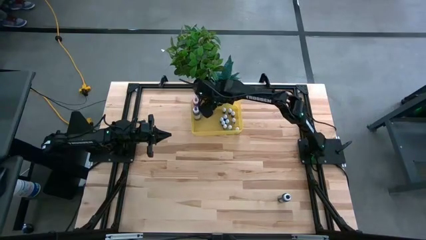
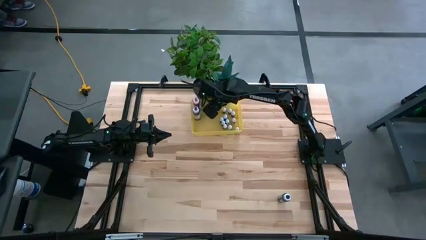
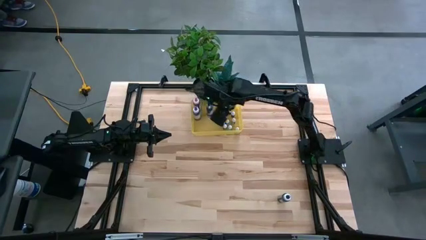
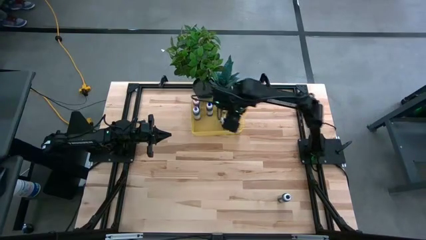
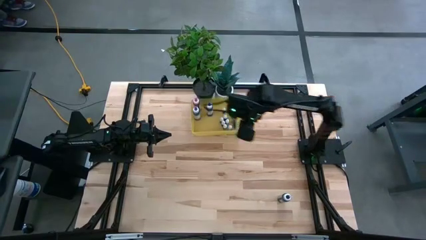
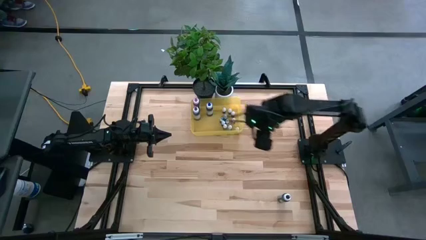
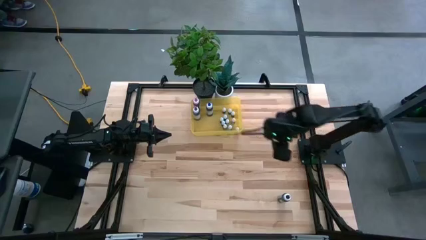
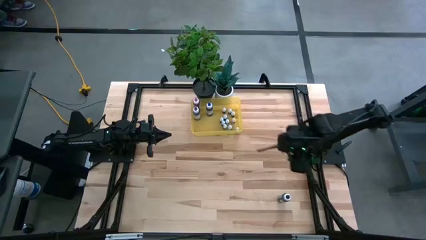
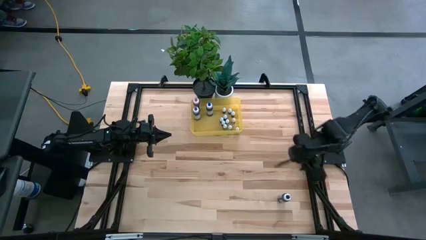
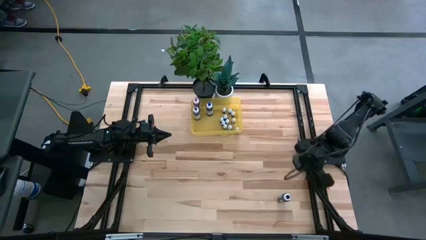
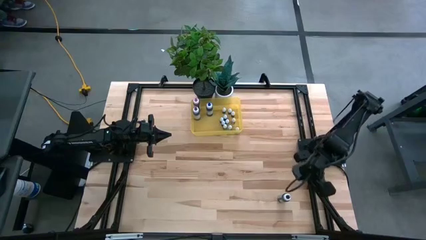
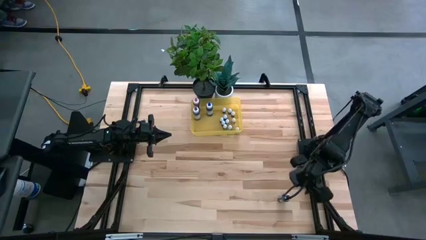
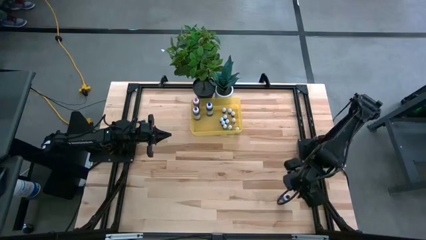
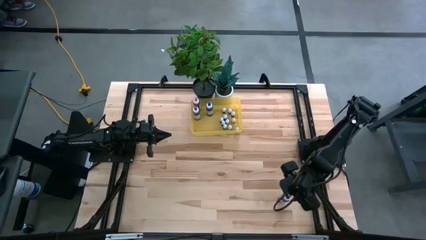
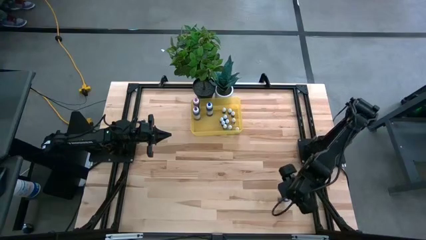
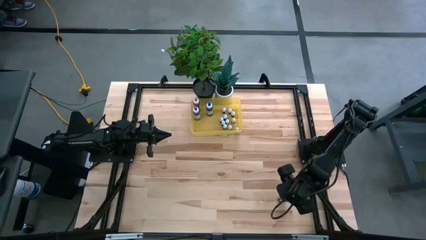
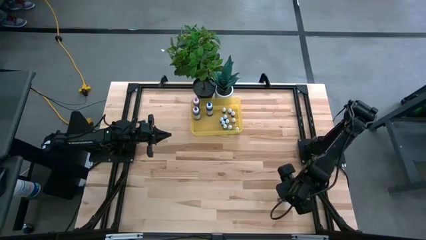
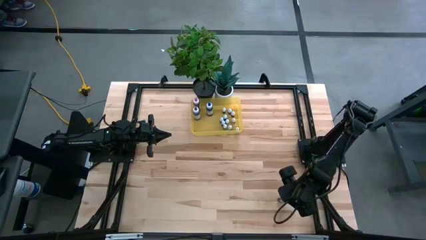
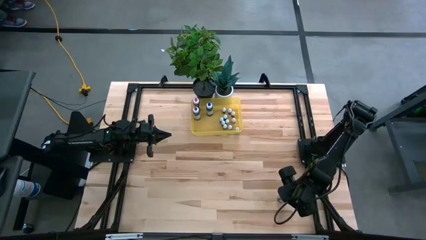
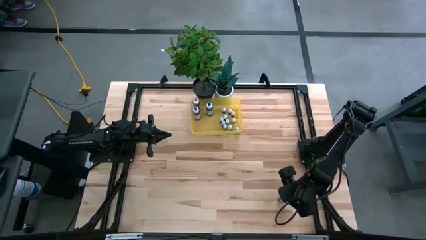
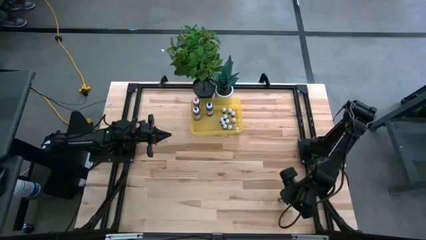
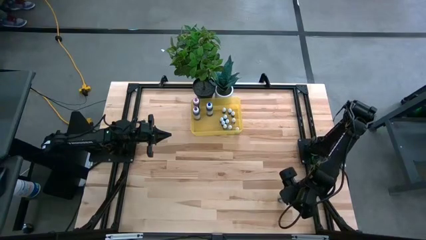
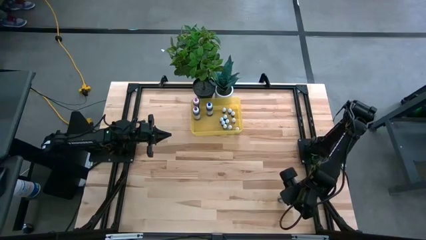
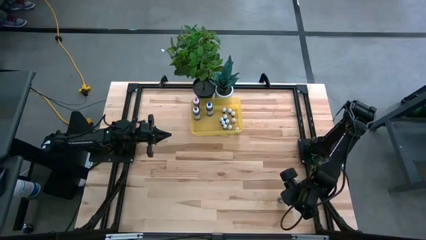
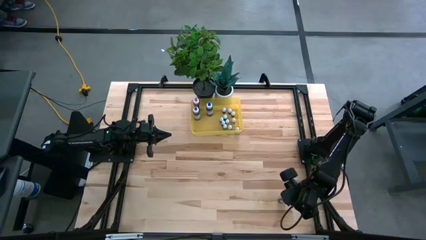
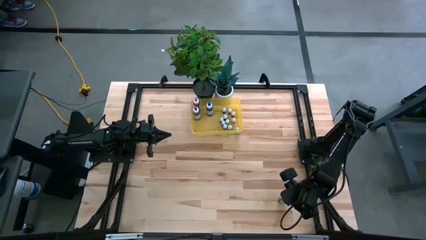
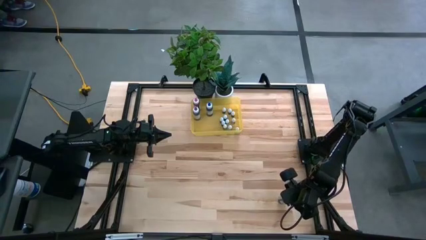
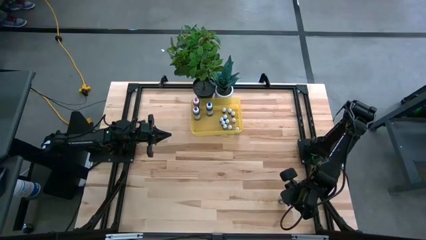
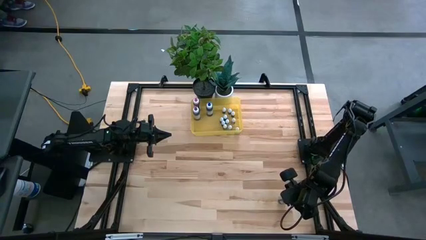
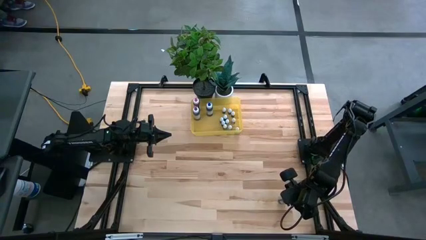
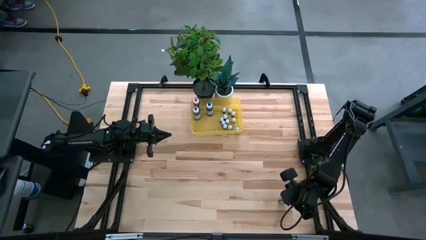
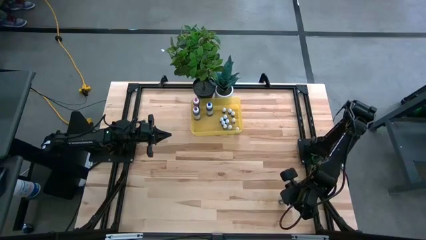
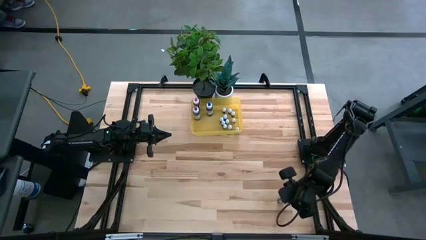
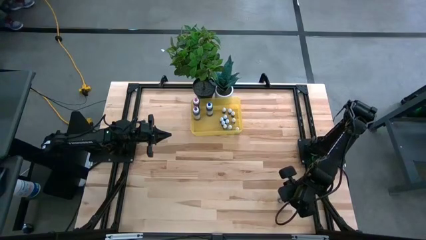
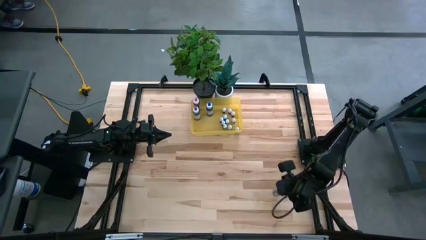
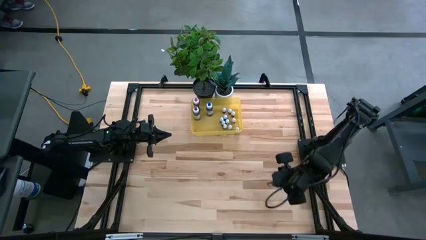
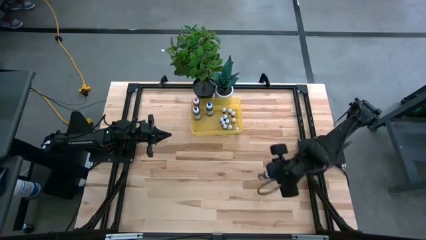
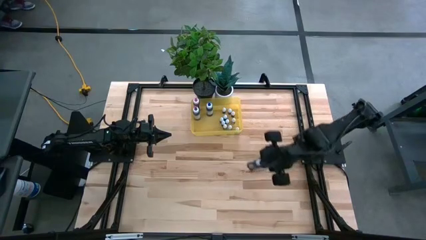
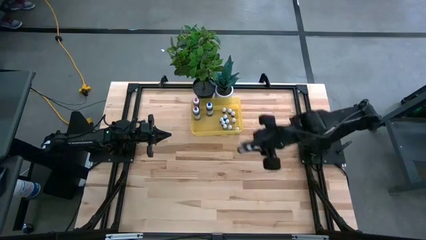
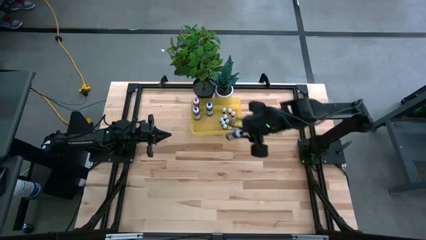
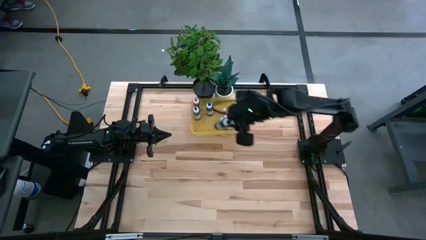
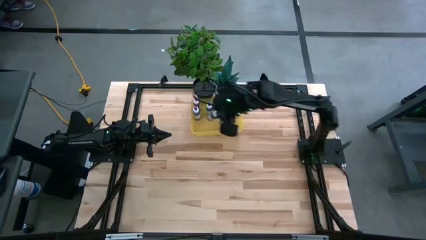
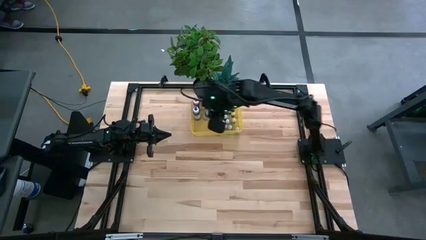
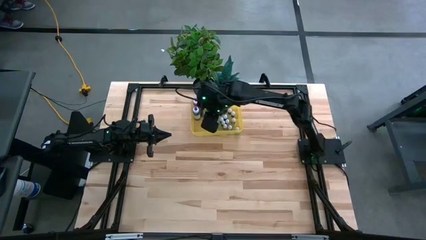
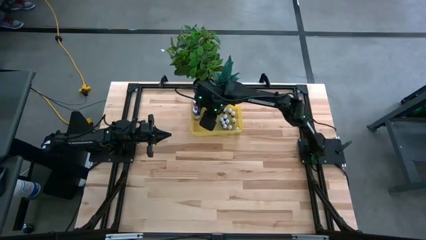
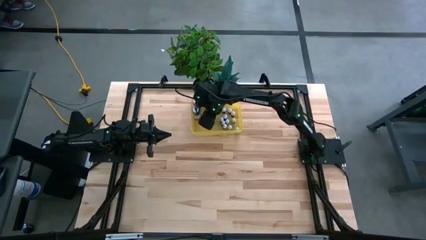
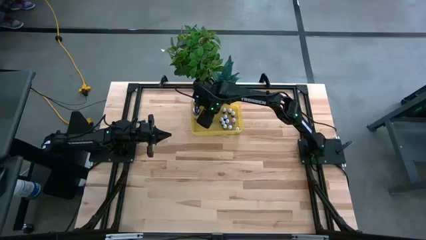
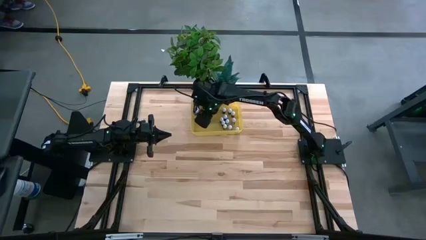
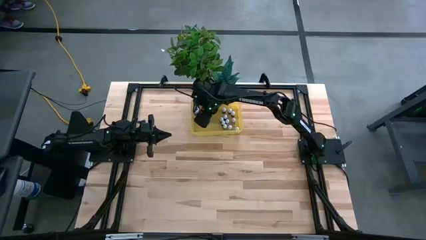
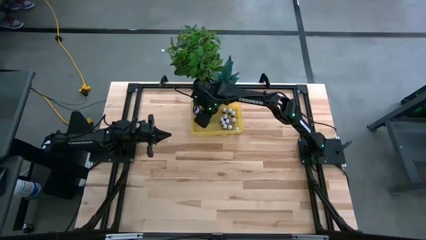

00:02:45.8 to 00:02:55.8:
Task: Pick & Place food coloring
Put the large black food coloring bottle into the yellow bin

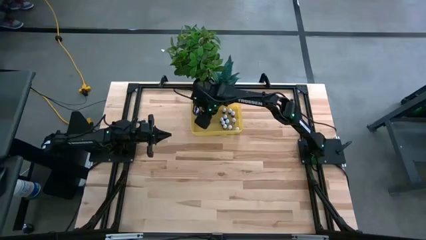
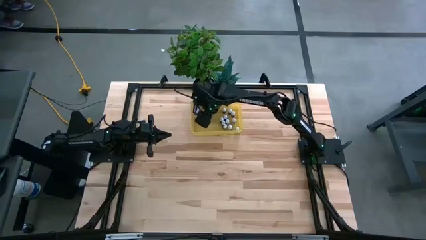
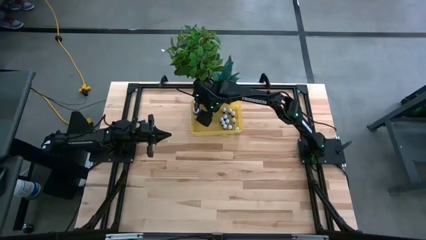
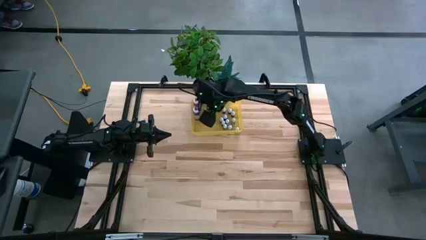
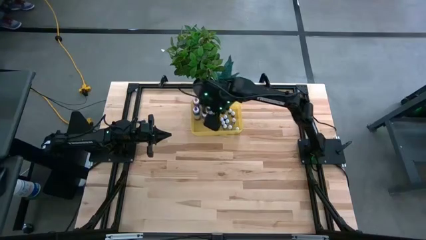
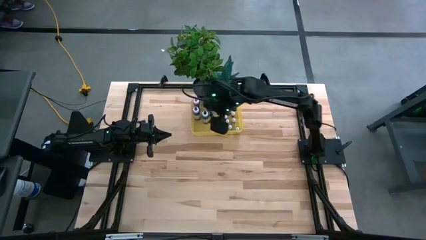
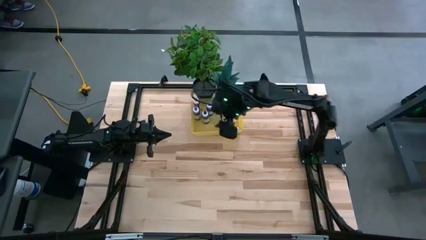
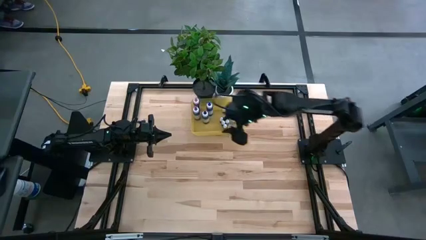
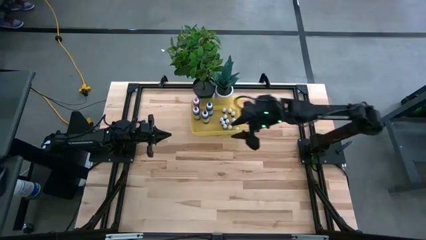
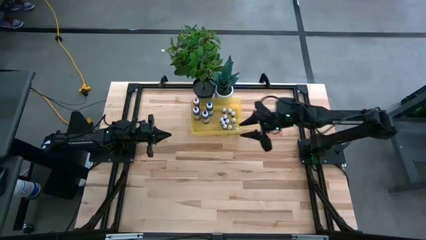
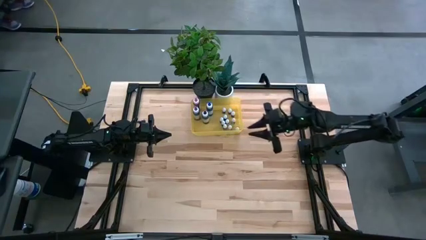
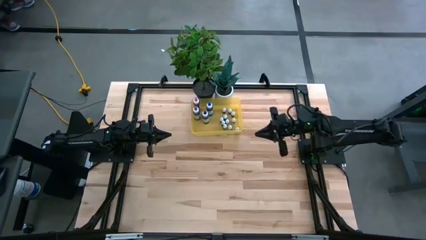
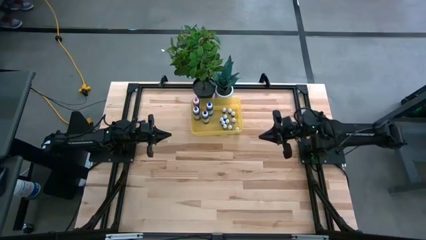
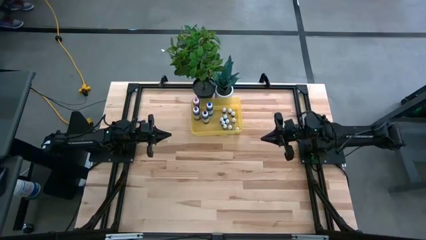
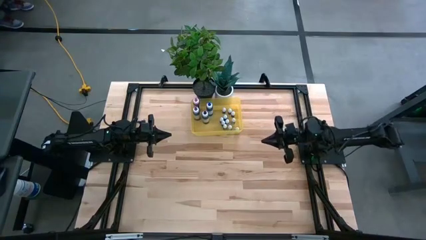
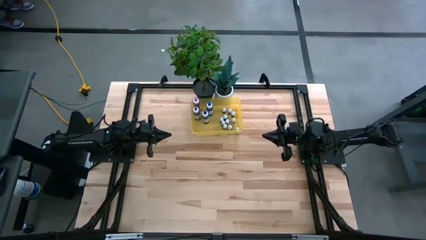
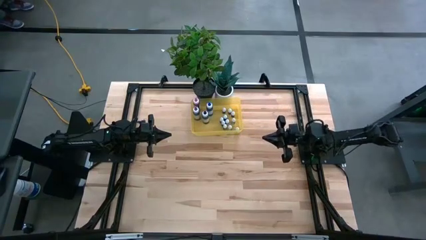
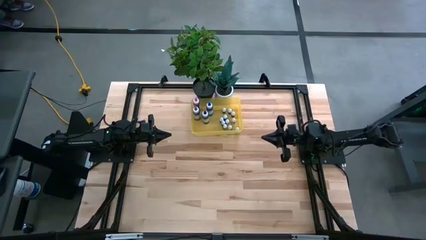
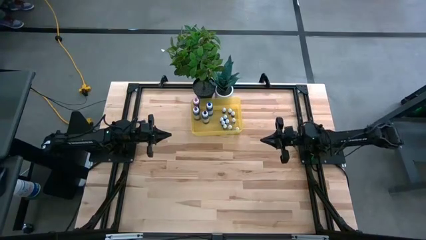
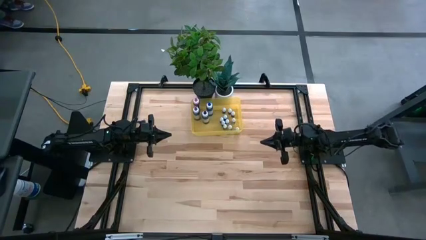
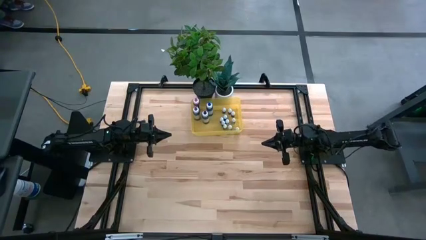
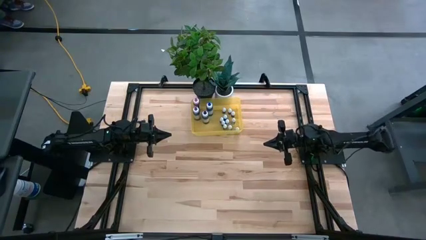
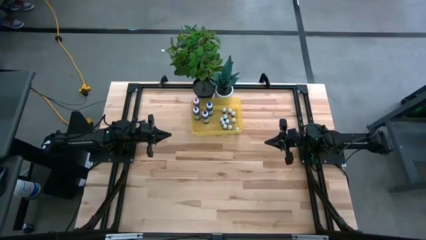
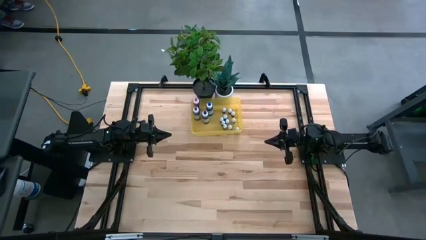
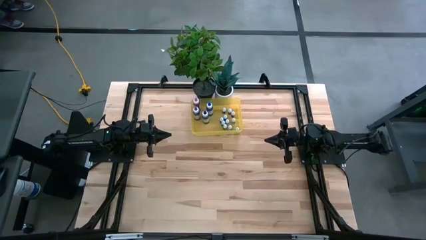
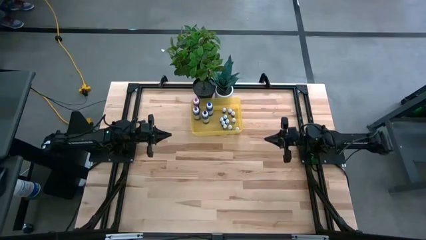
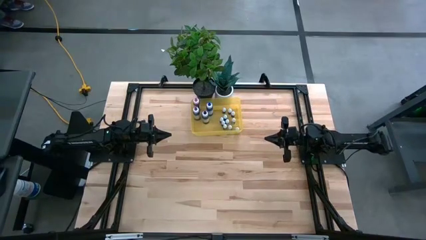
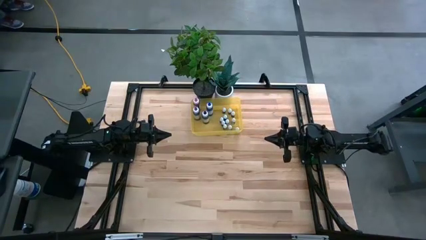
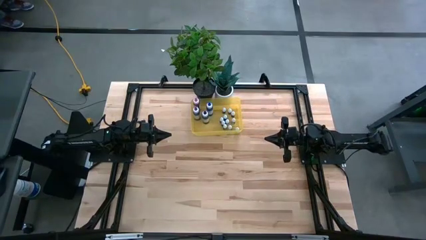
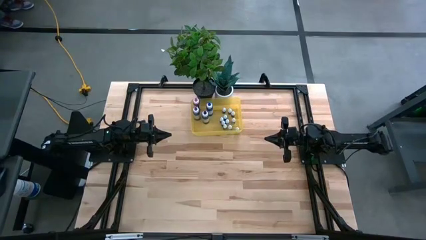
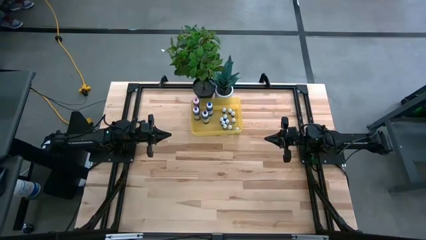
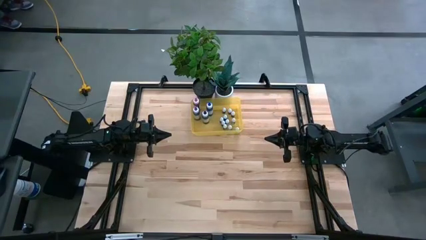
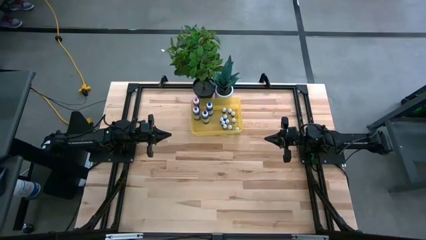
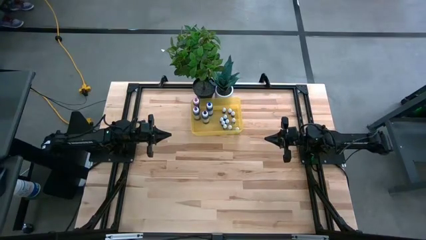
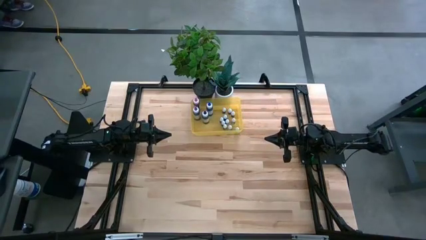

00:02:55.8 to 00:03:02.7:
Return to Home Position
